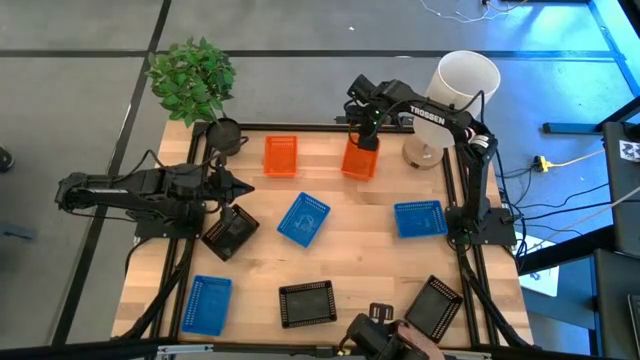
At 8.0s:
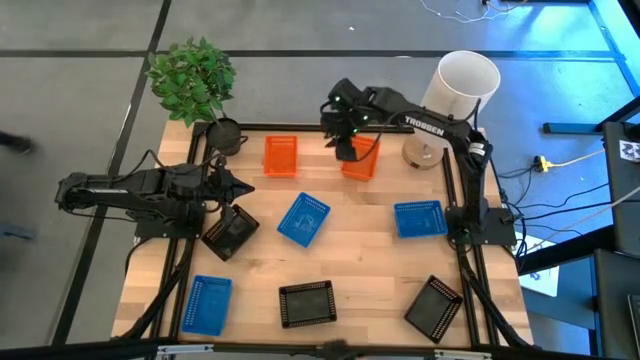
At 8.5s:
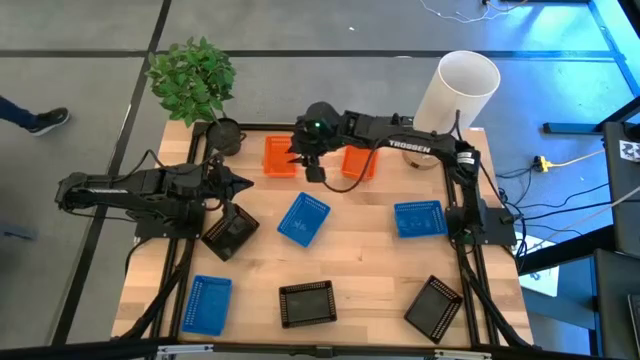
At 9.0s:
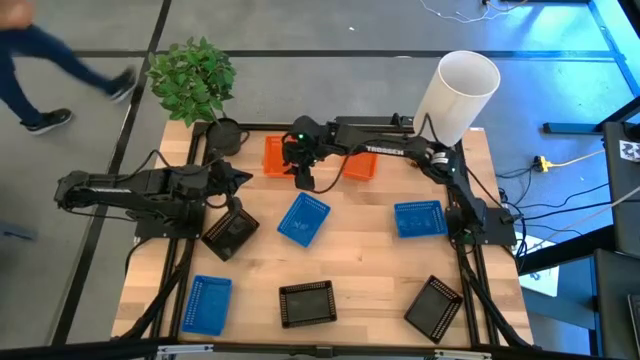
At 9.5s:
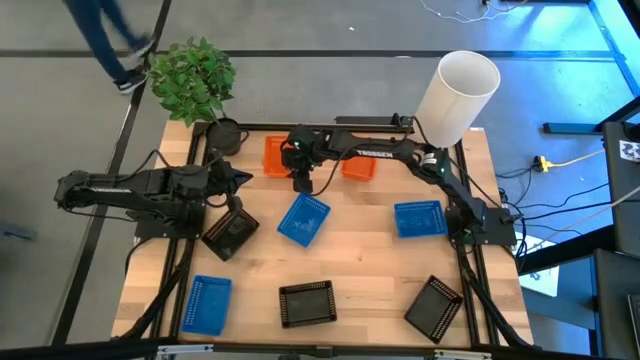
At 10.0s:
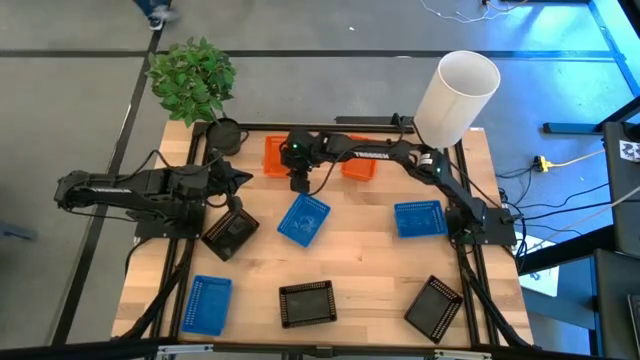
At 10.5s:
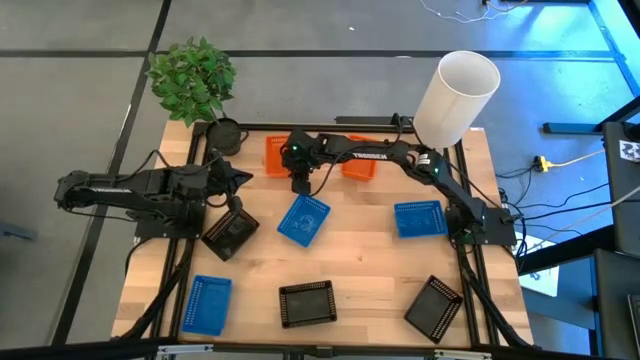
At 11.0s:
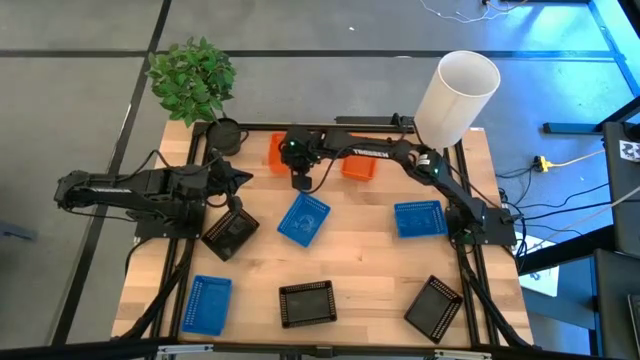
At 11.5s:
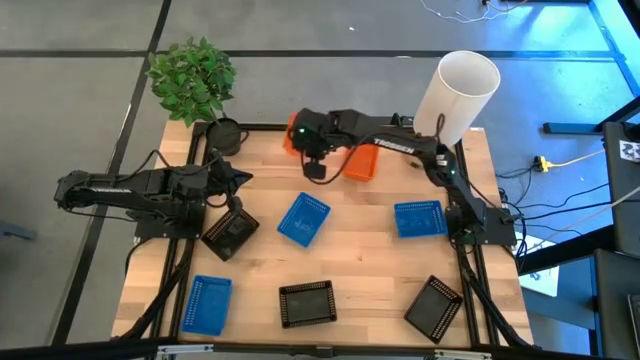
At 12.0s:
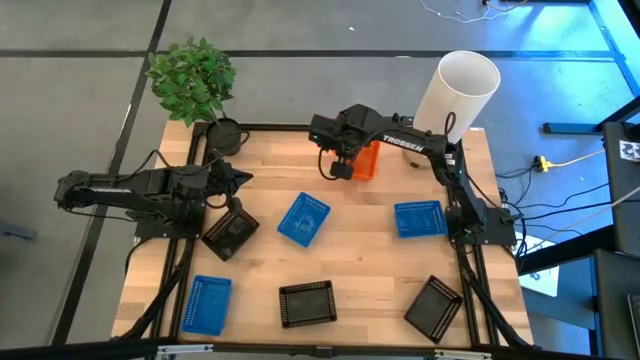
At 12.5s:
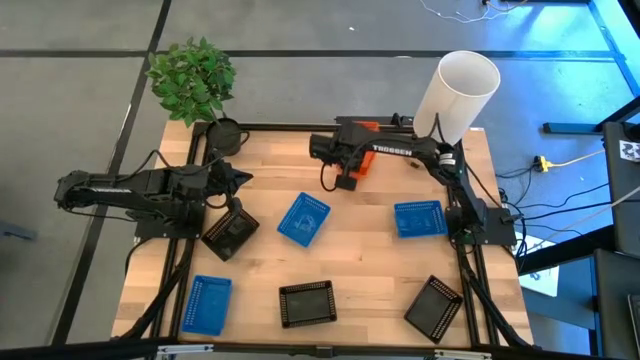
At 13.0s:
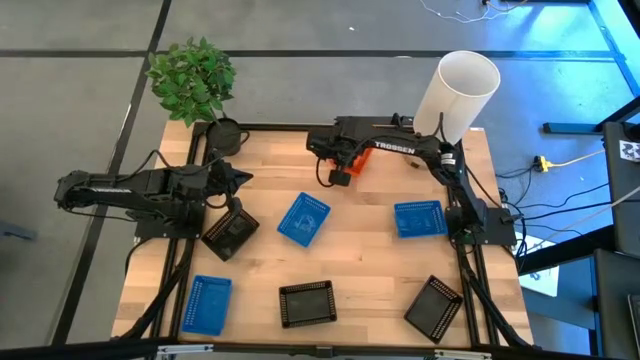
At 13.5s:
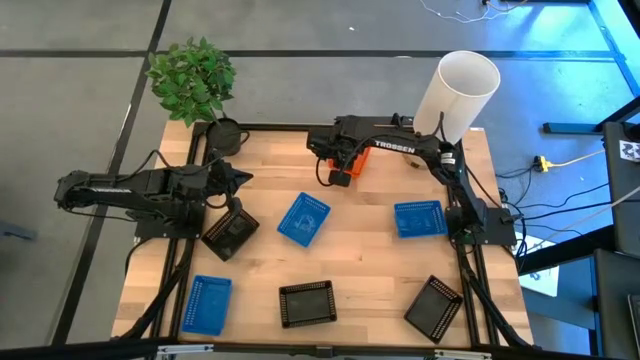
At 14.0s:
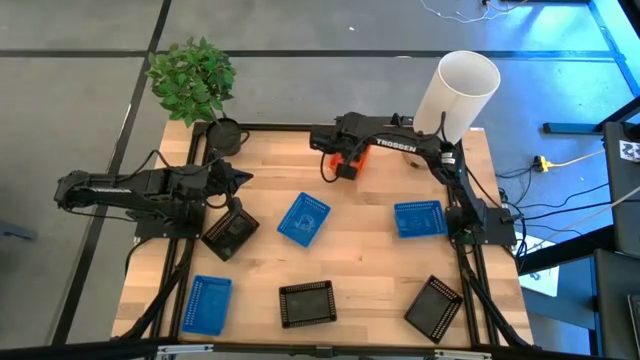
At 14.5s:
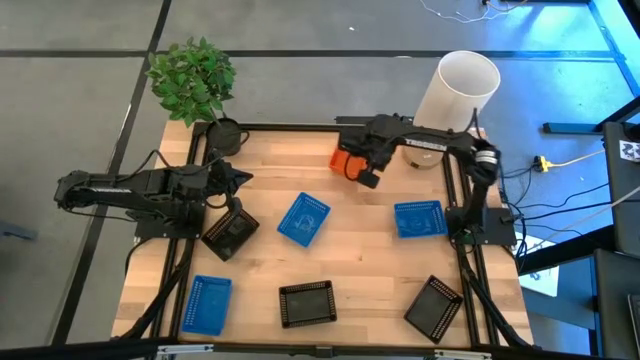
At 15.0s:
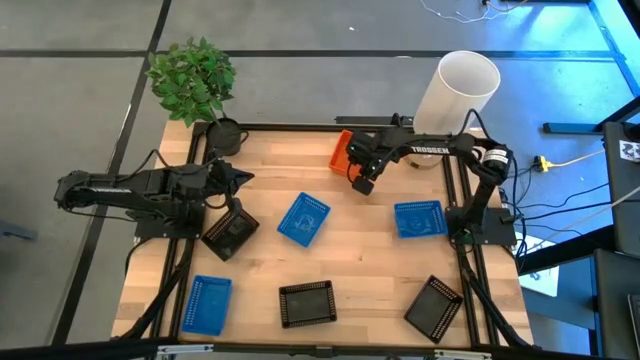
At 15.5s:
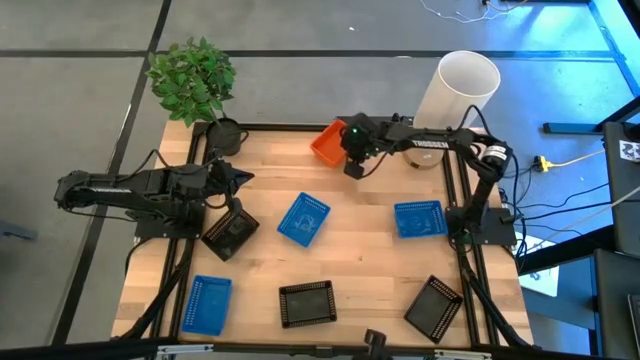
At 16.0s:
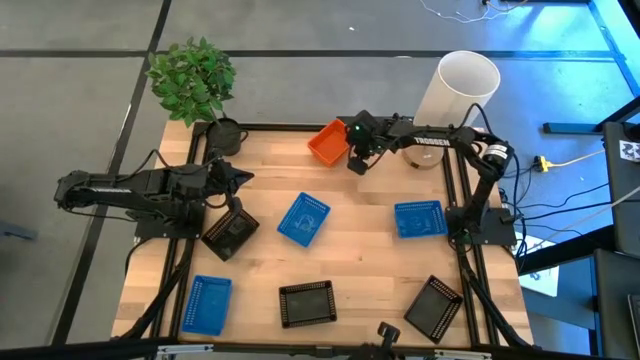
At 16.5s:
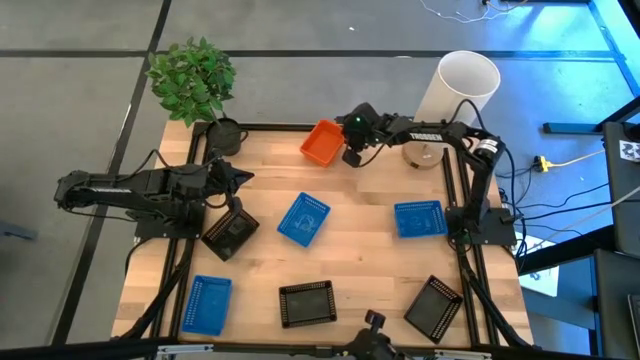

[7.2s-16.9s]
Stack the left orange bin on the orange bins

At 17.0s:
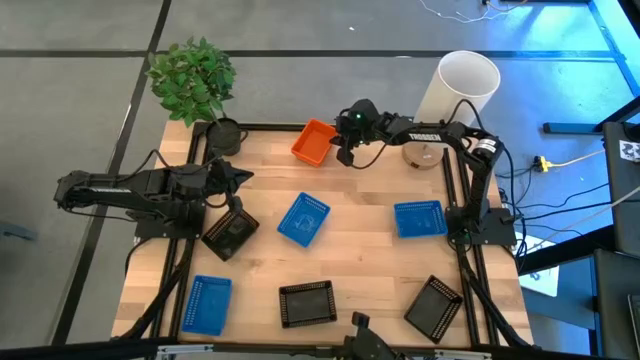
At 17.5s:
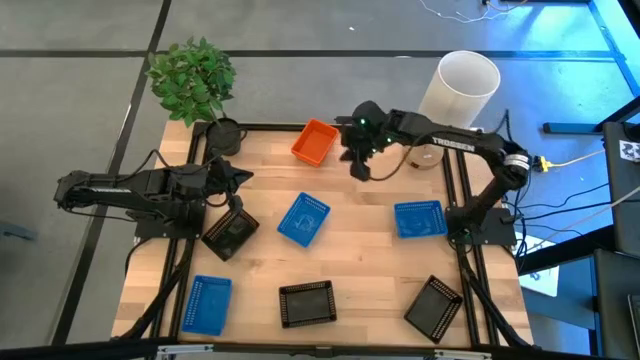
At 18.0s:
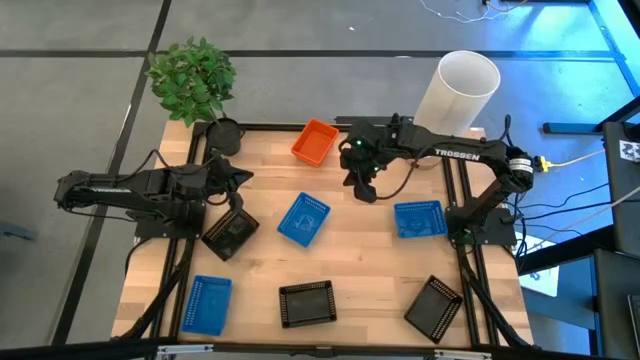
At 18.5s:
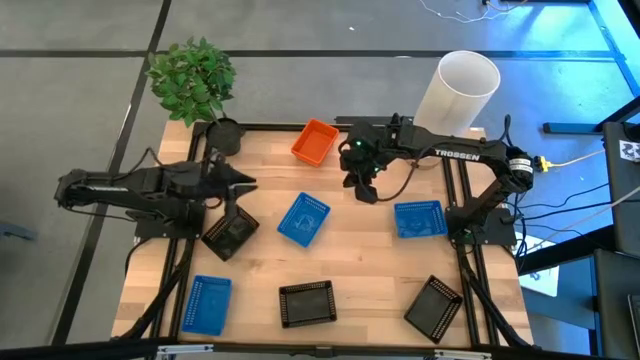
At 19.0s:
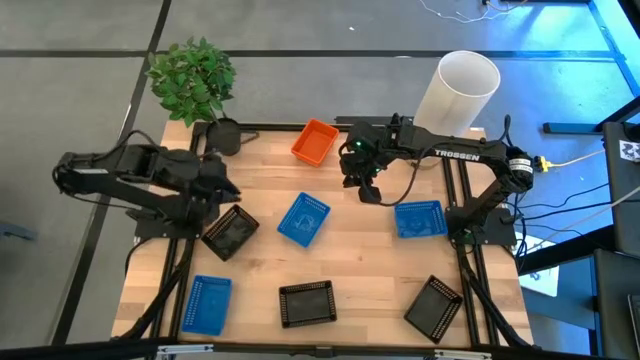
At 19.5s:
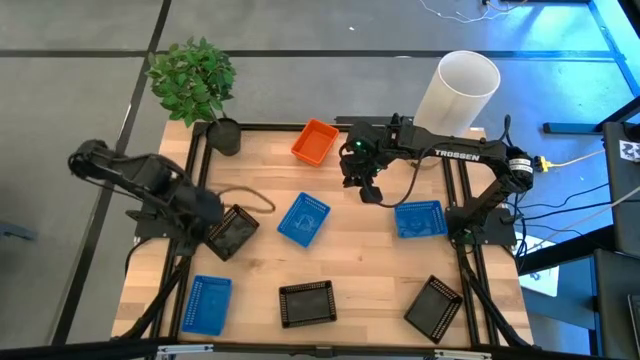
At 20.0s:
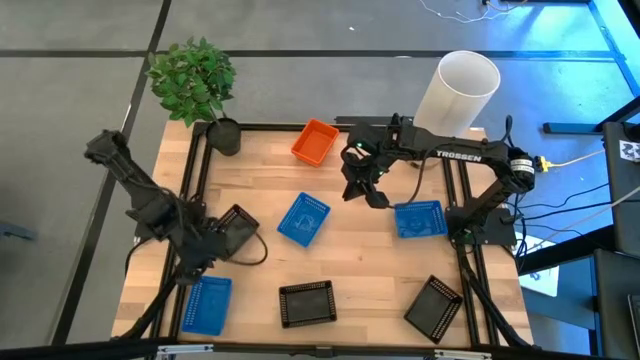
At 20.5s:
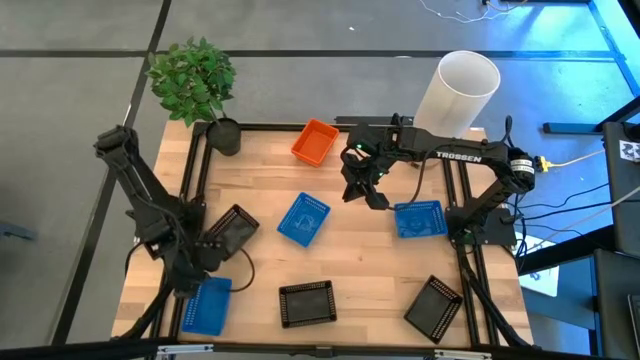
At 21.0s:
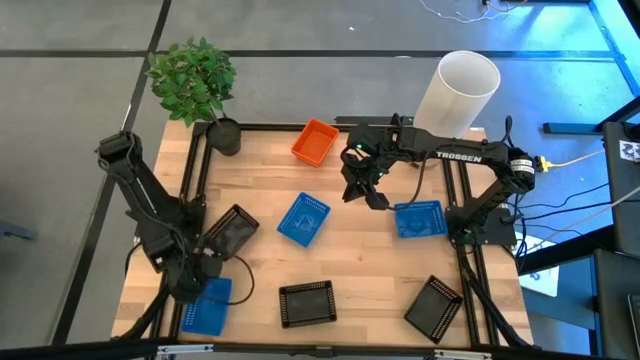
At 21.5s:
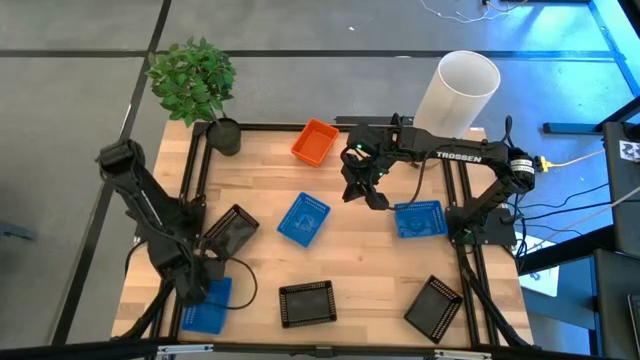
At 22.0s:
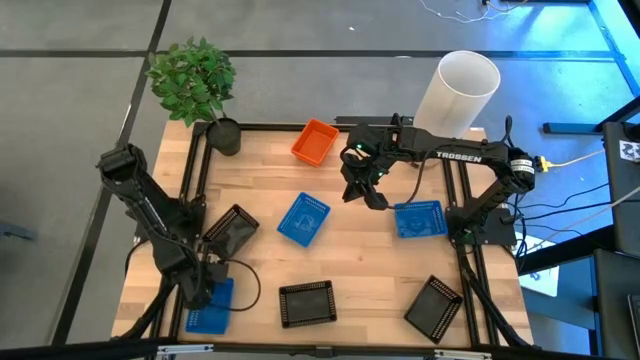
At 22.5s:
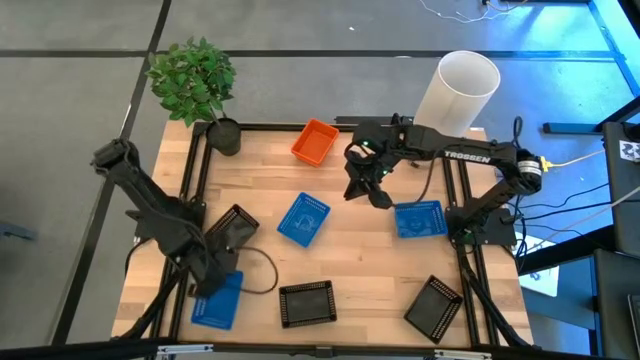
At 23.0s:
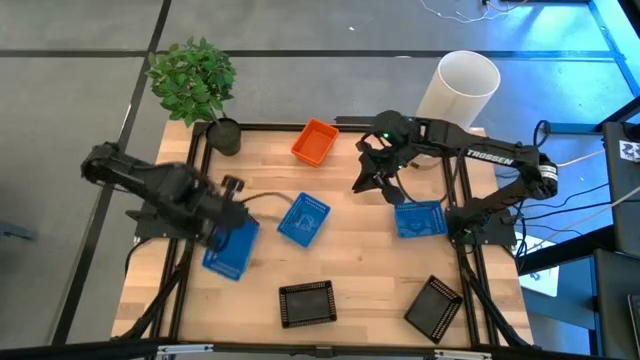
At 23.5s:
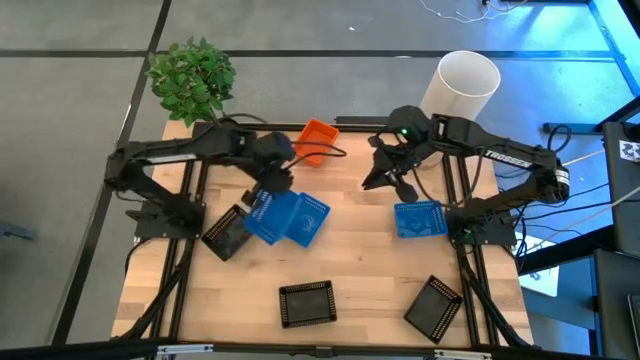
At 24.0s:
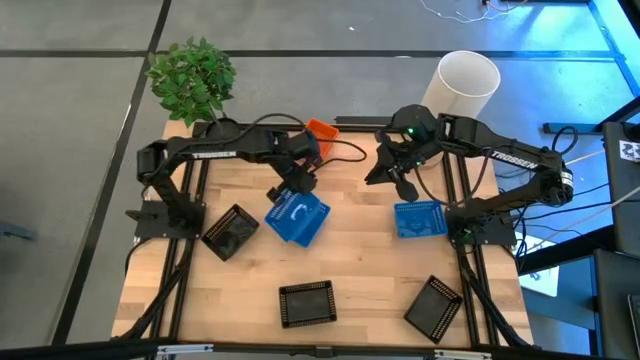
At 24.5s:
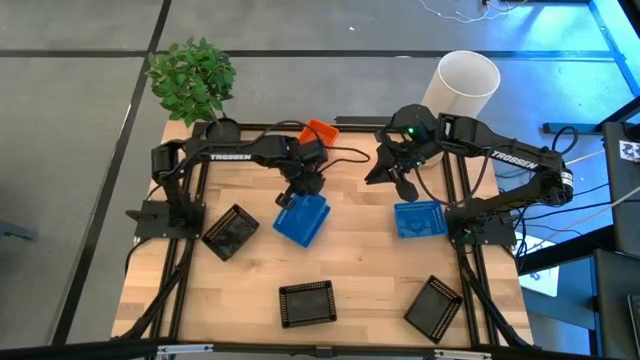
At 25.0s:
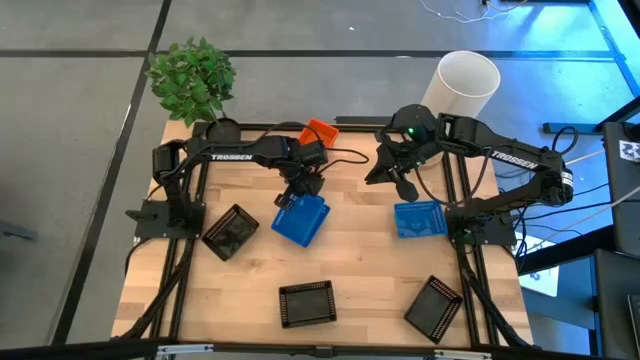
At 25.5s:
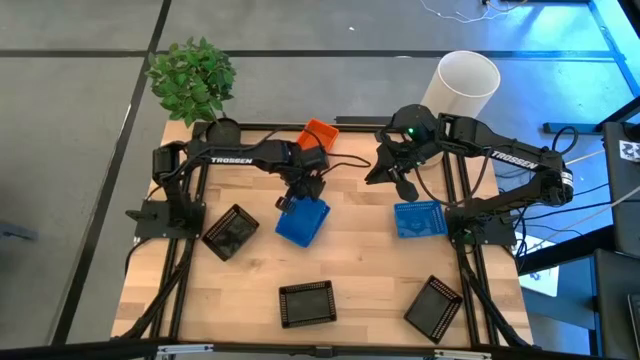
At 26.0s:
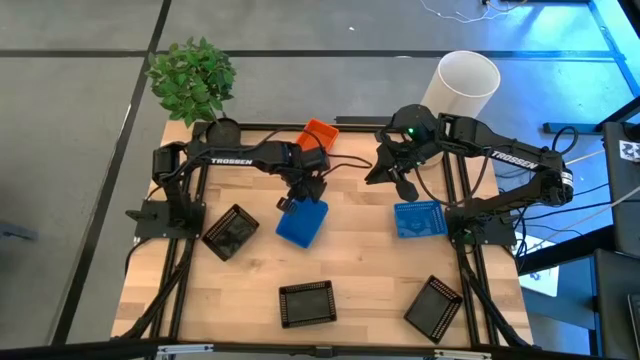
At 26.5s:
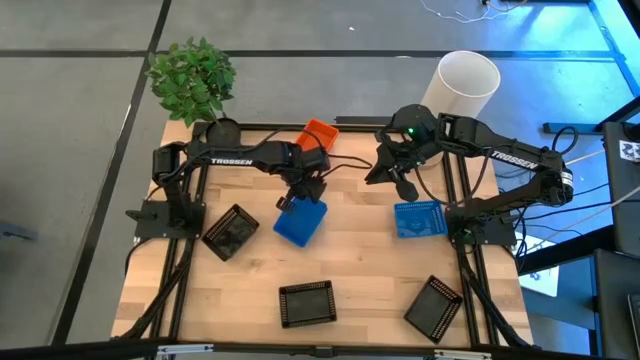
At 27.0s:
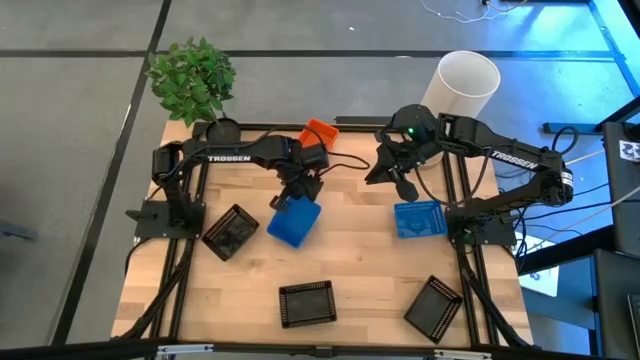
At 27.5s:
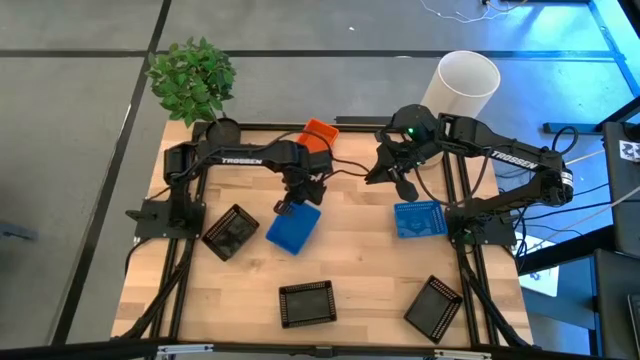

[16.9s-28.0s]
Stack the bottom blue bin on the left blue bin
